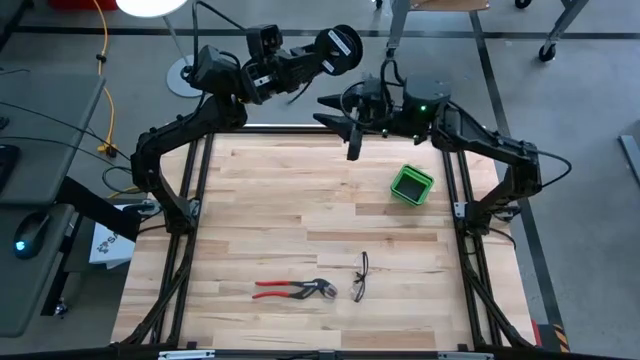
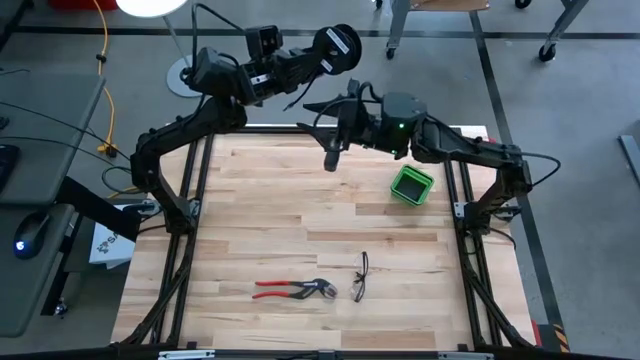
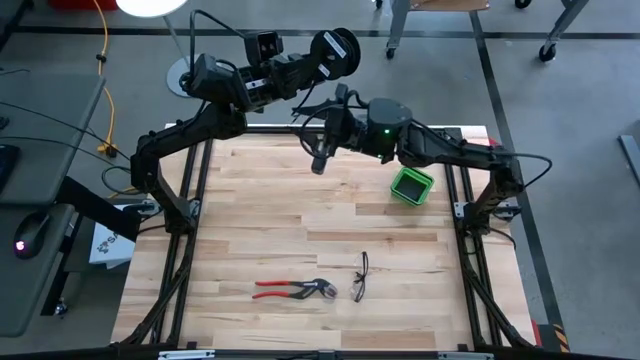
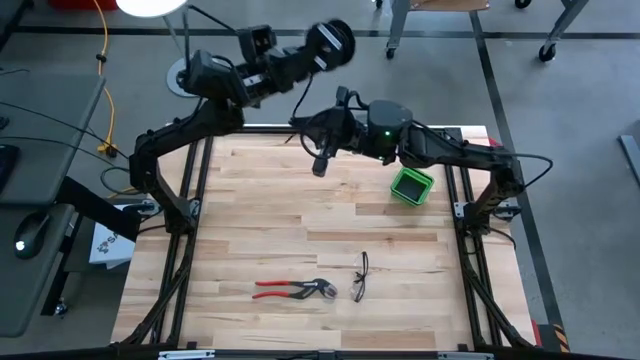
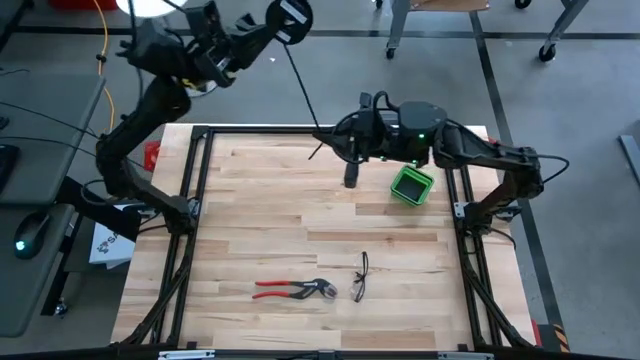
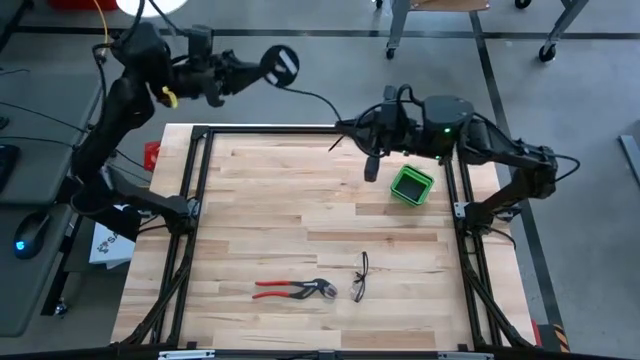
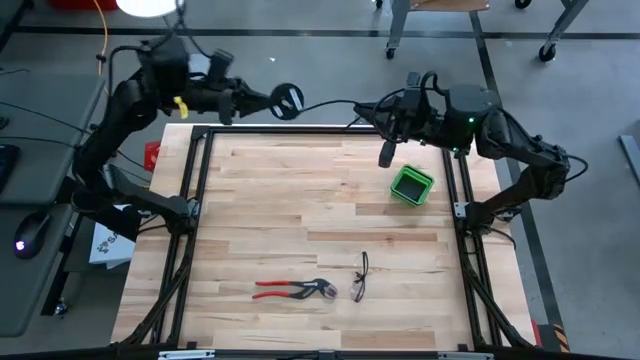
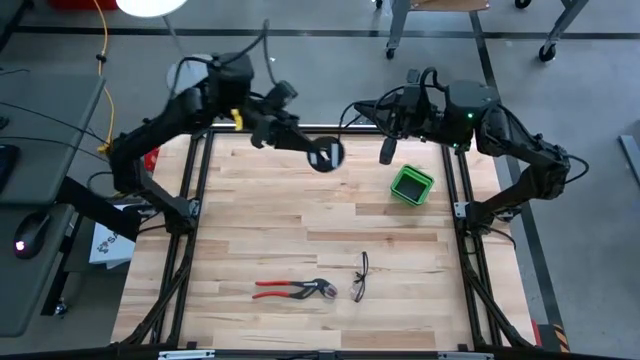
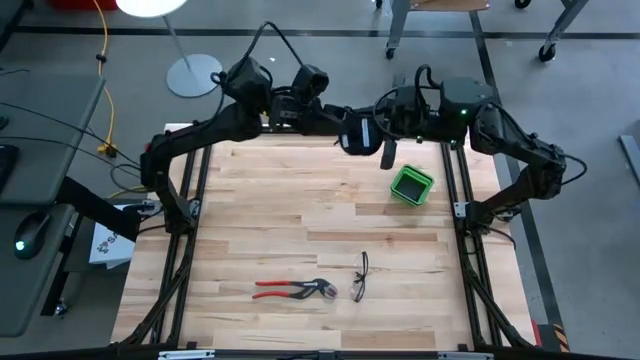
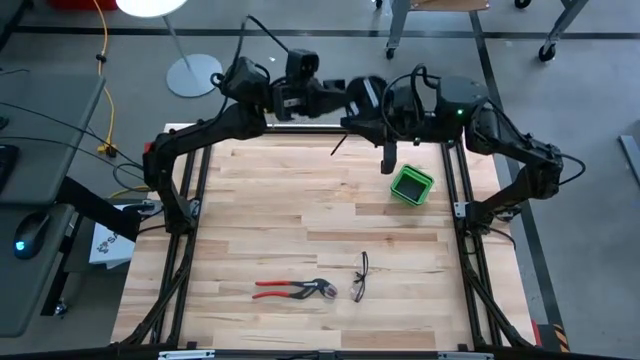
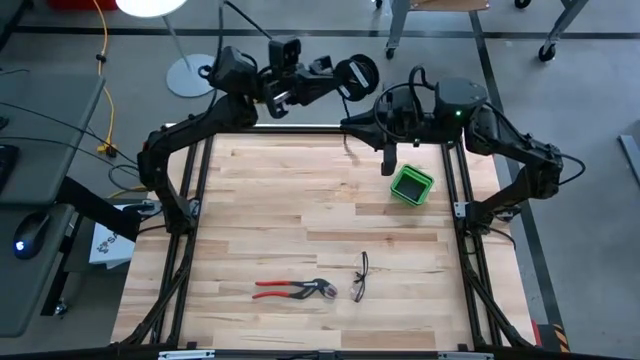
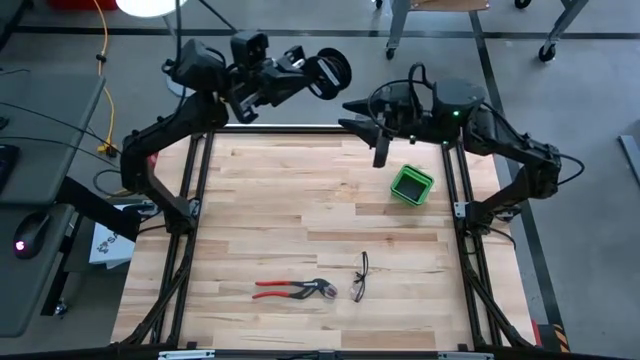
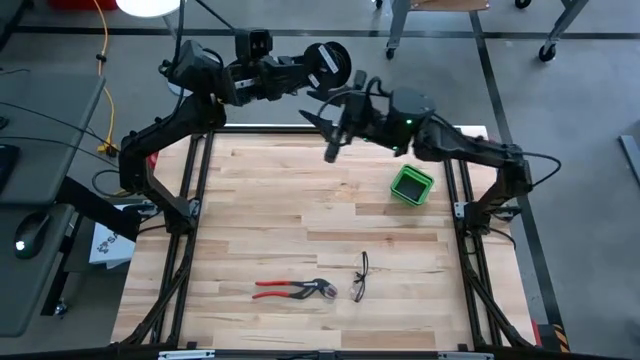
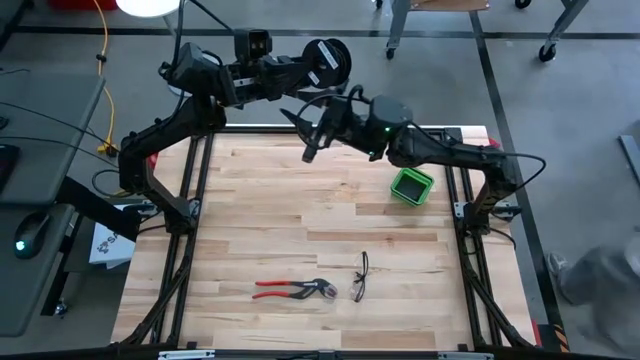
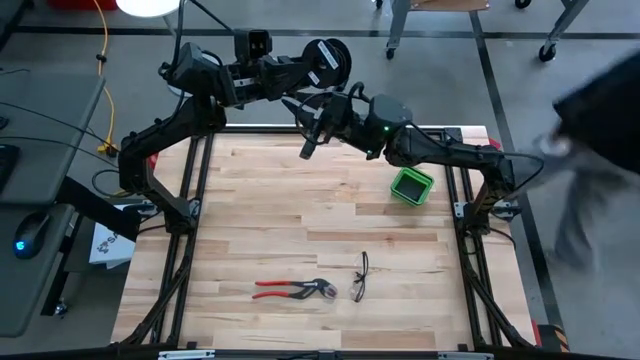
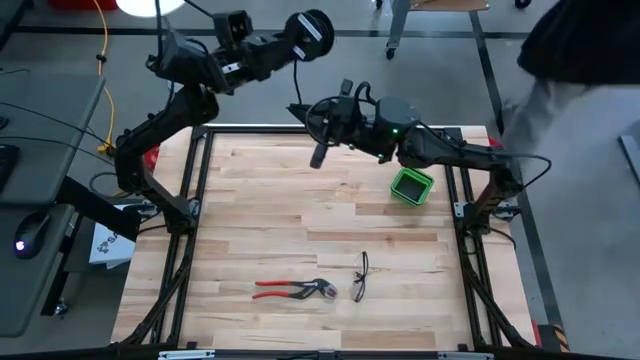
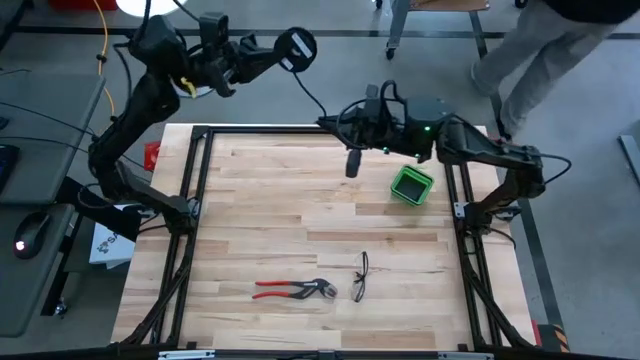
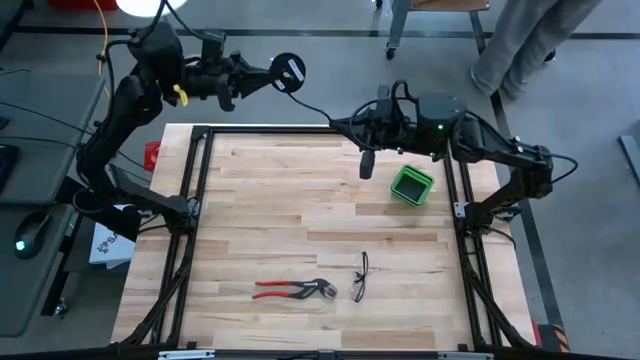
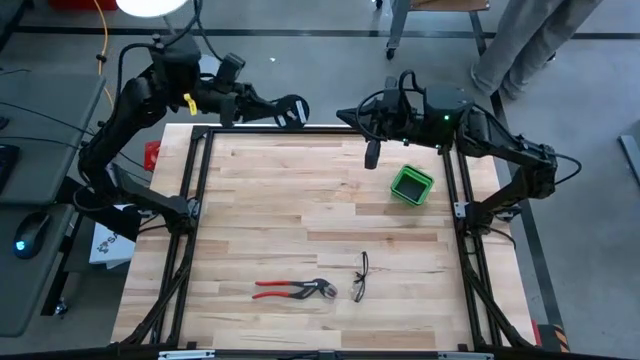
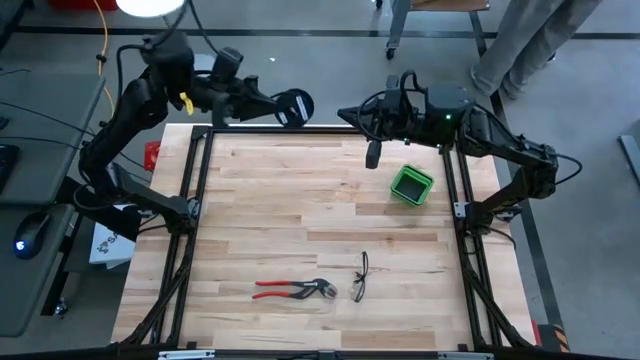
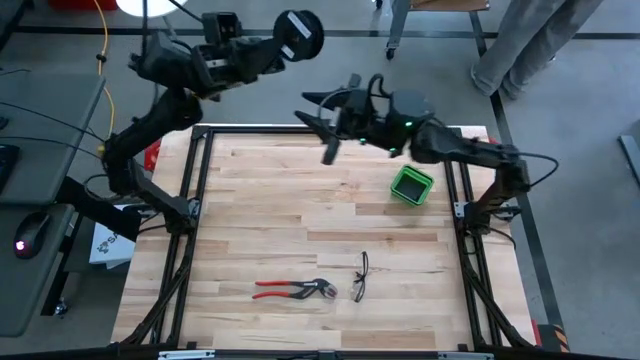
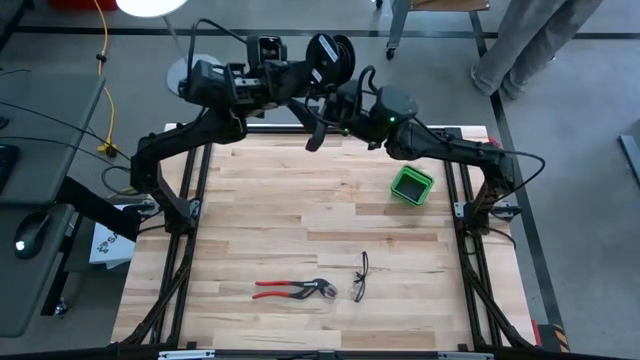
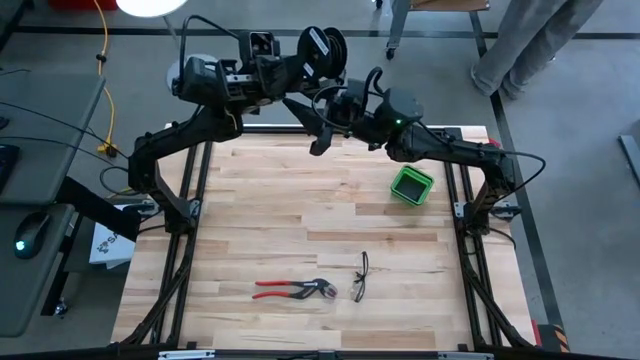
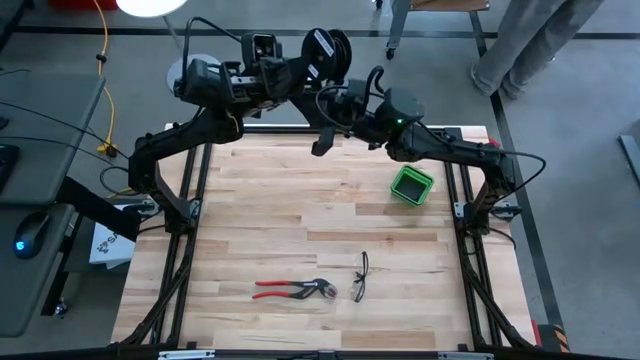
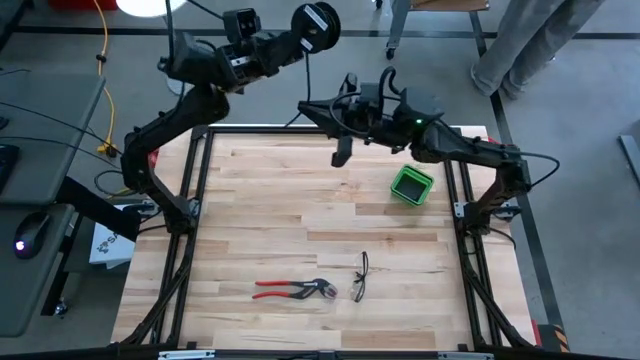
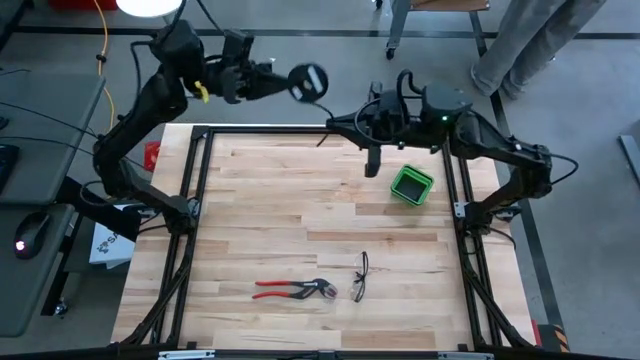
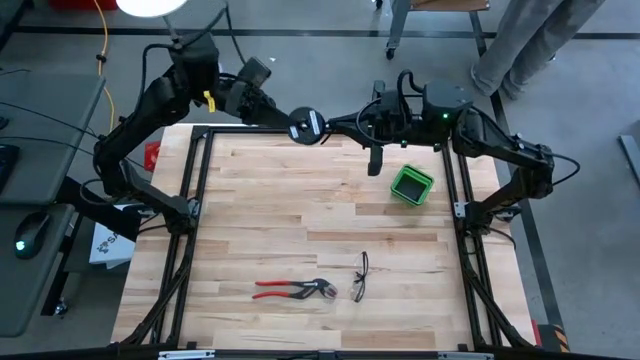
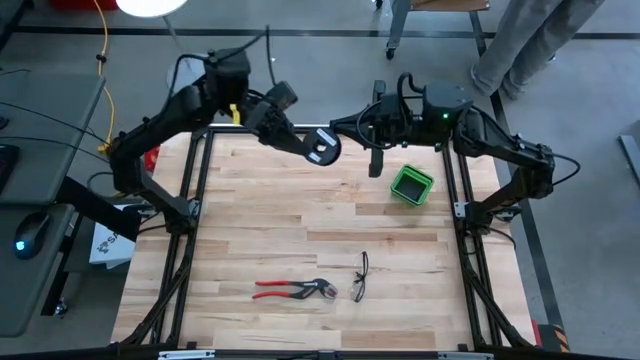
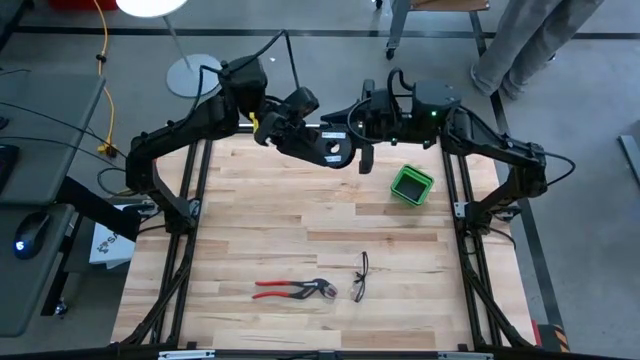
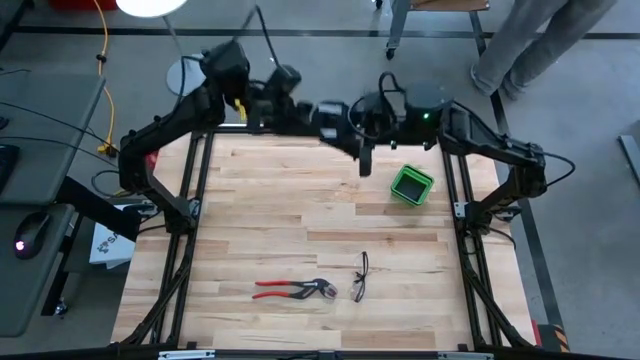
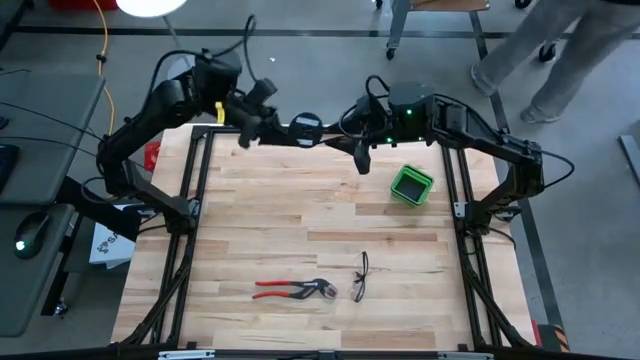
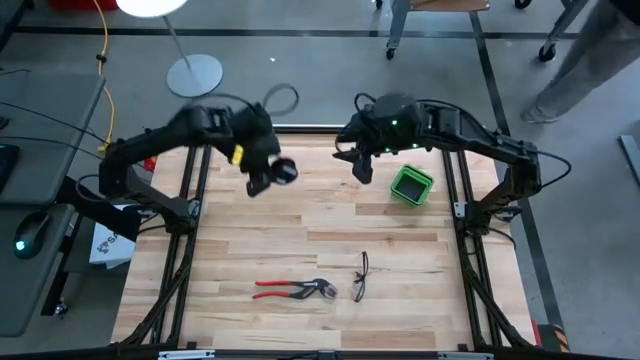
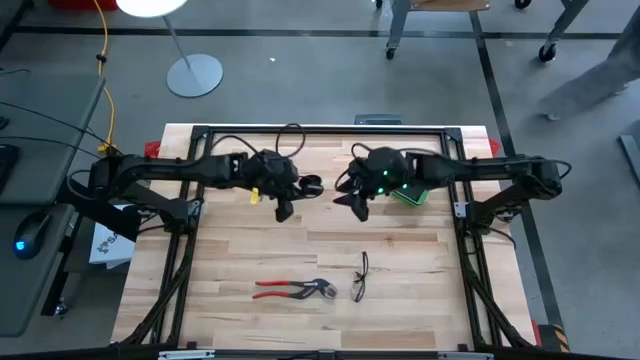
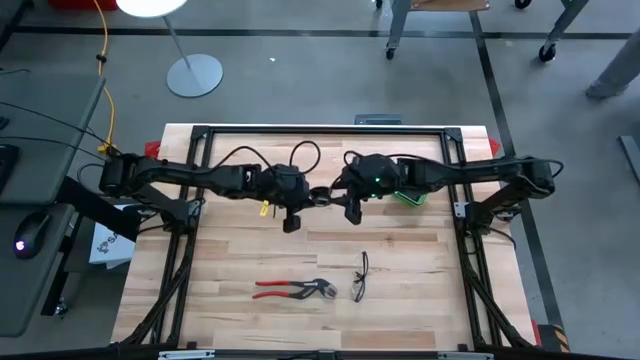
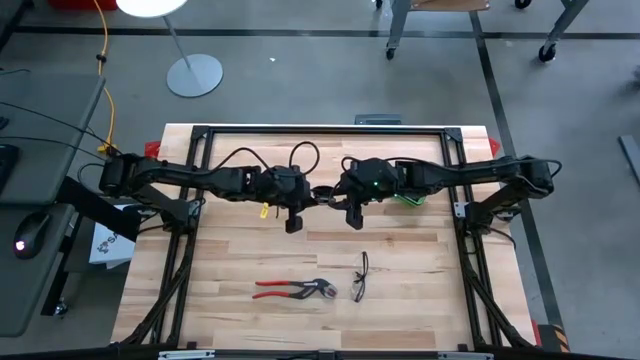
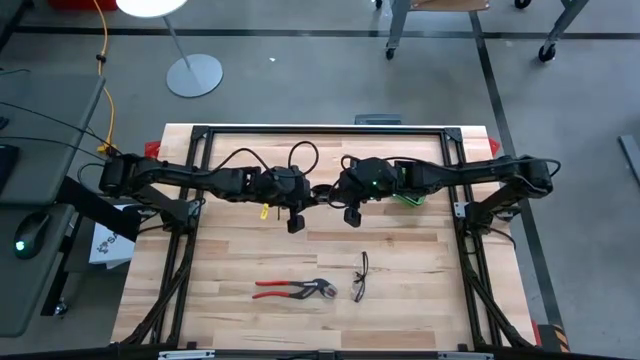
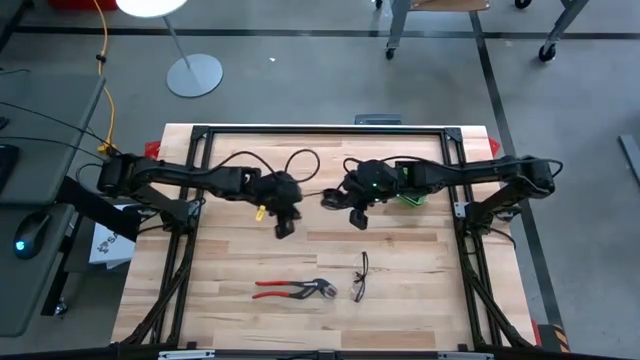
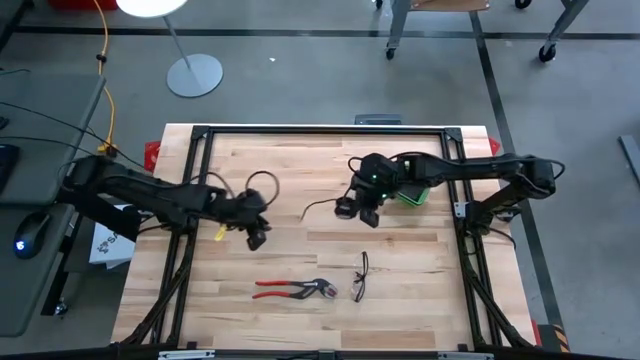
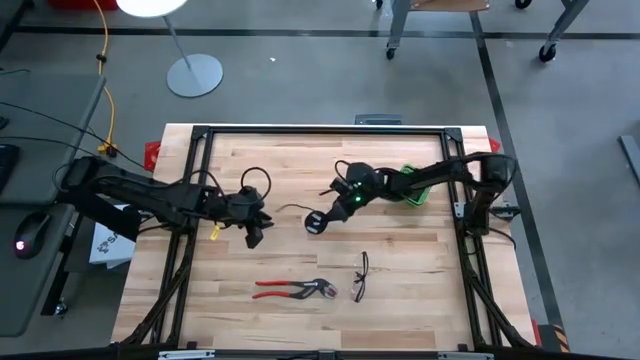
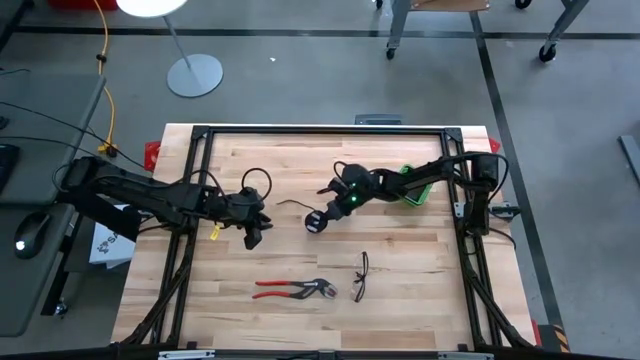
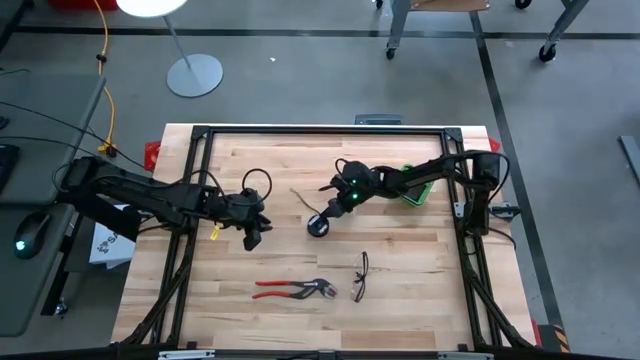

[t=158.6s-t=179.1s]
Task: Coil cords
Coil the black wire onto the black spool
